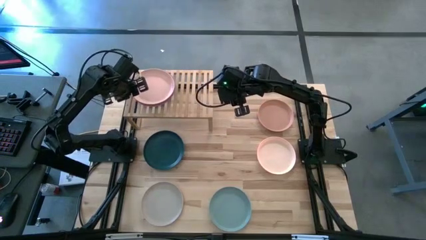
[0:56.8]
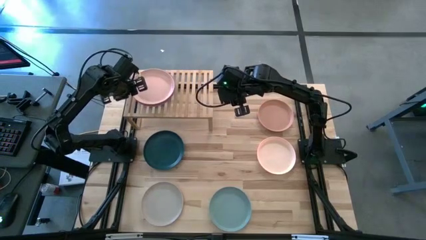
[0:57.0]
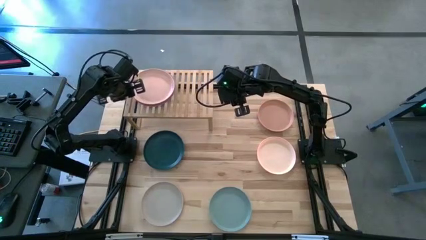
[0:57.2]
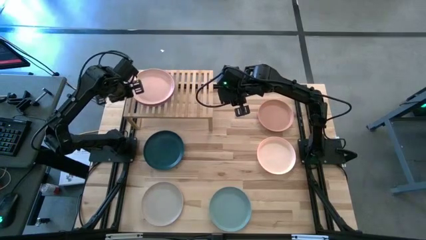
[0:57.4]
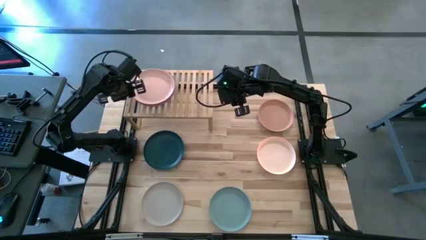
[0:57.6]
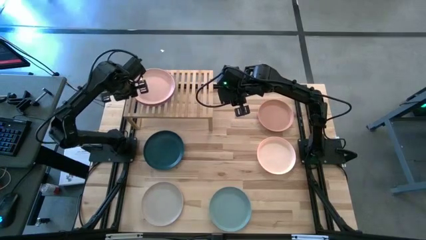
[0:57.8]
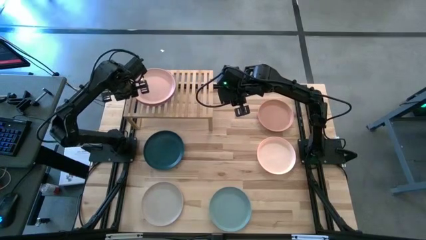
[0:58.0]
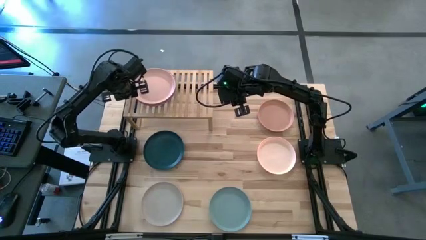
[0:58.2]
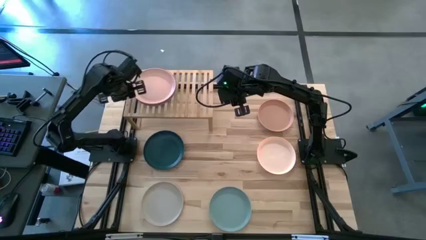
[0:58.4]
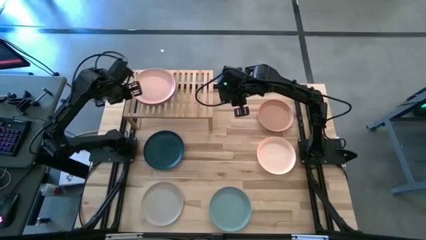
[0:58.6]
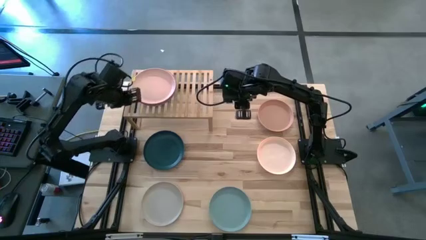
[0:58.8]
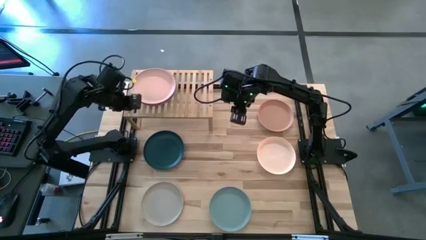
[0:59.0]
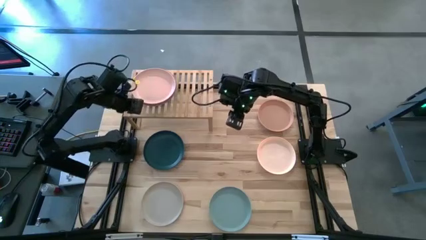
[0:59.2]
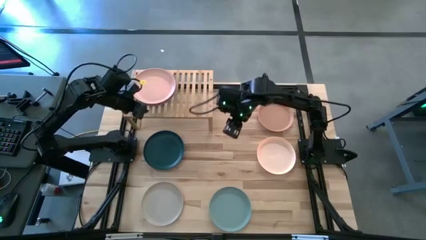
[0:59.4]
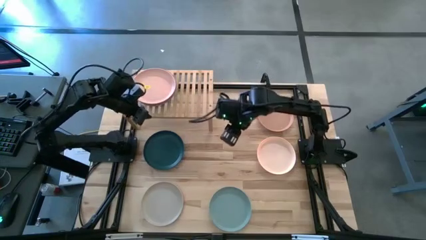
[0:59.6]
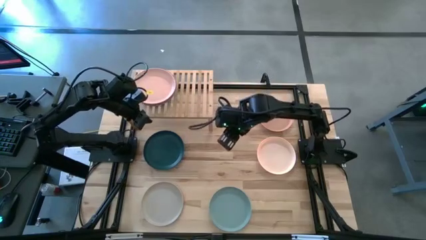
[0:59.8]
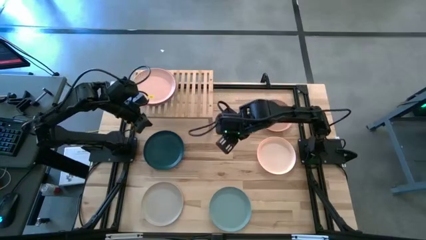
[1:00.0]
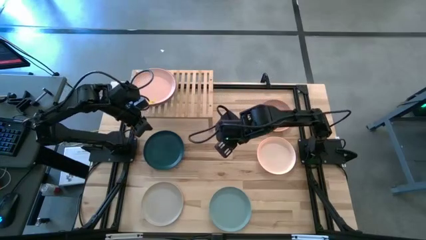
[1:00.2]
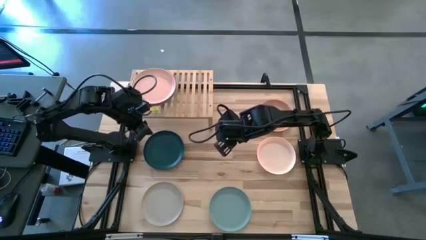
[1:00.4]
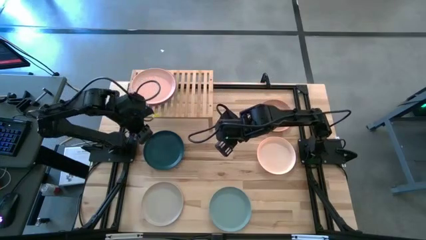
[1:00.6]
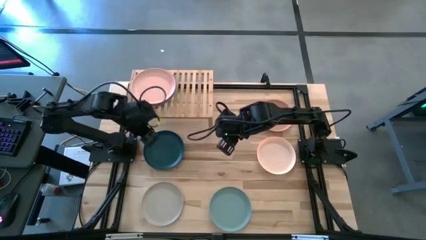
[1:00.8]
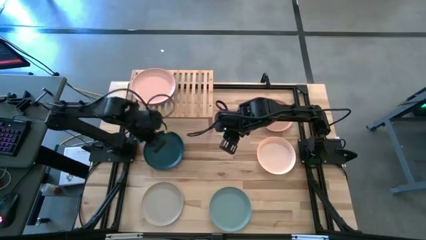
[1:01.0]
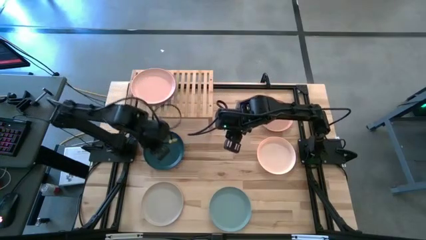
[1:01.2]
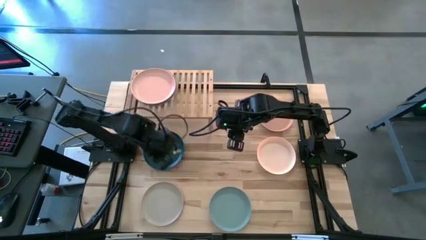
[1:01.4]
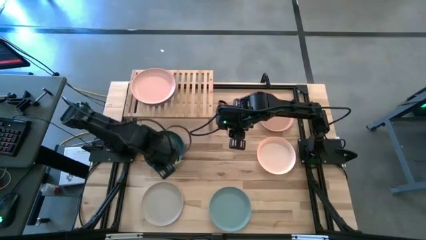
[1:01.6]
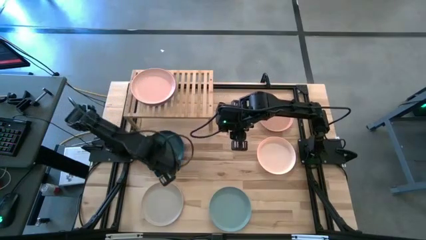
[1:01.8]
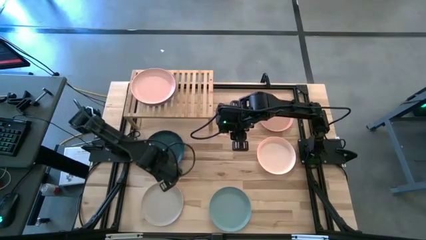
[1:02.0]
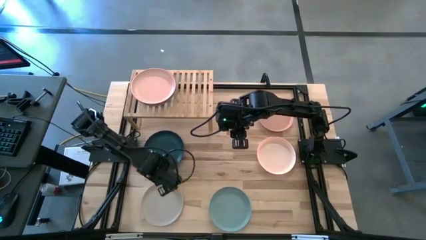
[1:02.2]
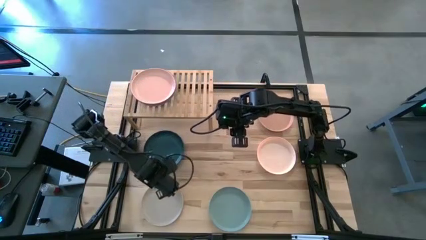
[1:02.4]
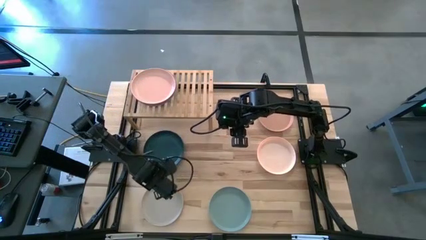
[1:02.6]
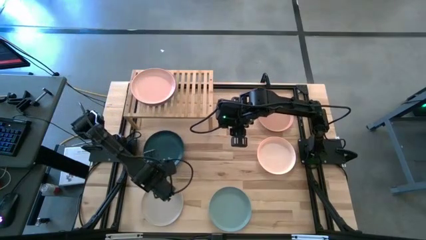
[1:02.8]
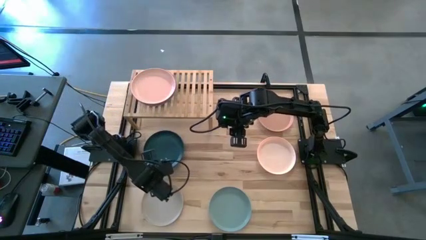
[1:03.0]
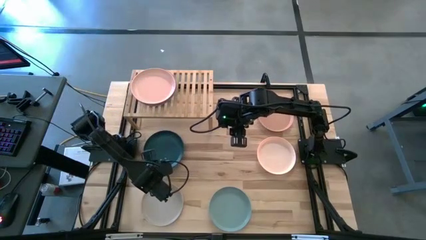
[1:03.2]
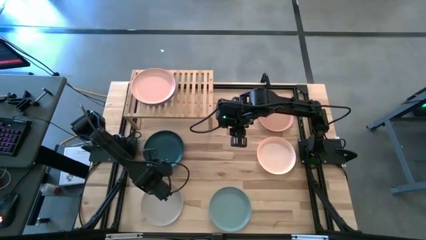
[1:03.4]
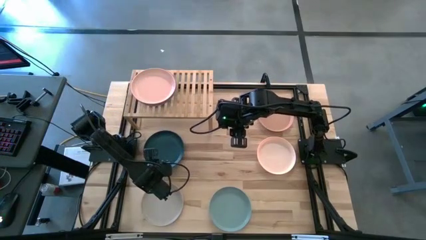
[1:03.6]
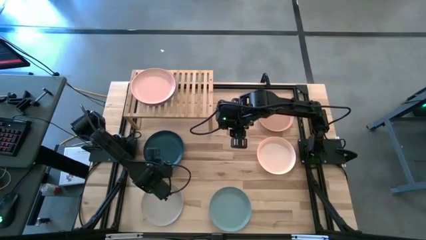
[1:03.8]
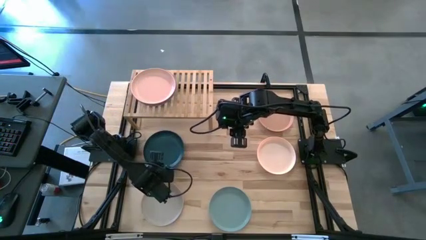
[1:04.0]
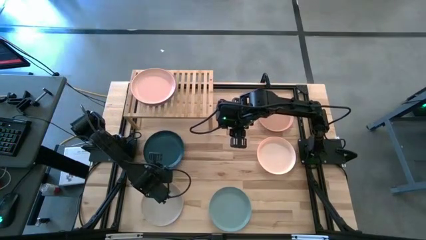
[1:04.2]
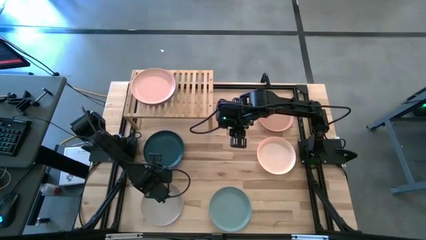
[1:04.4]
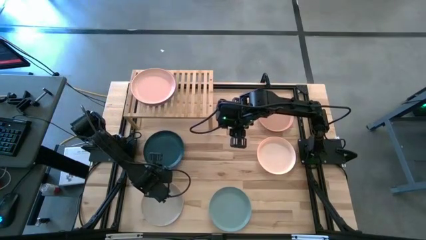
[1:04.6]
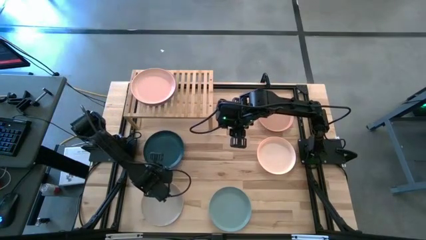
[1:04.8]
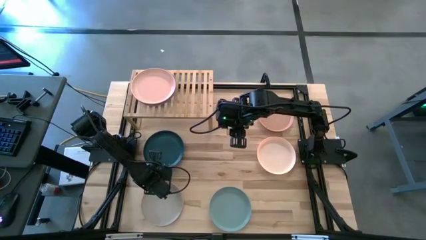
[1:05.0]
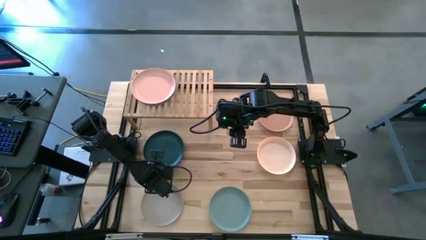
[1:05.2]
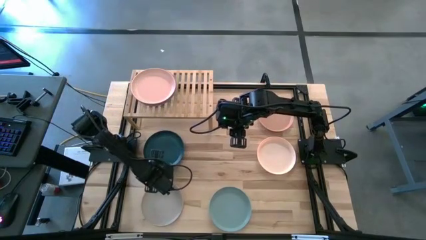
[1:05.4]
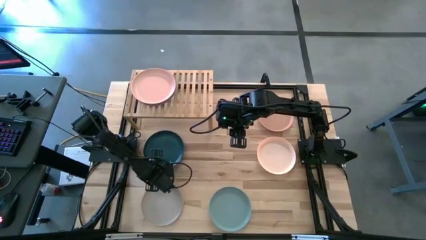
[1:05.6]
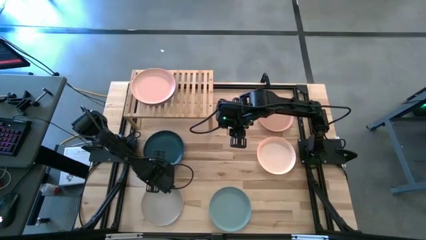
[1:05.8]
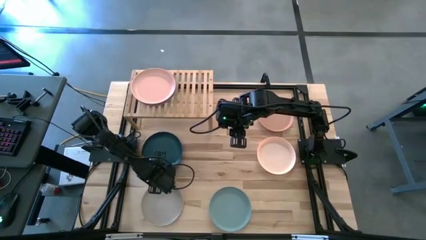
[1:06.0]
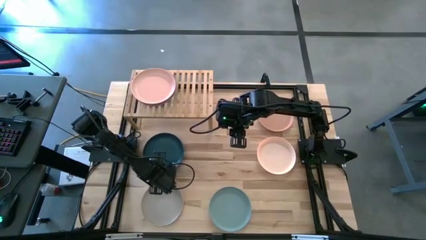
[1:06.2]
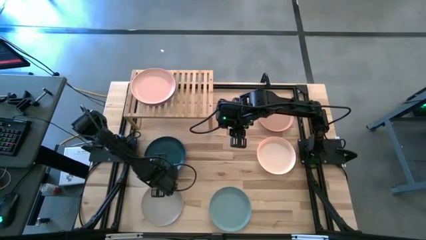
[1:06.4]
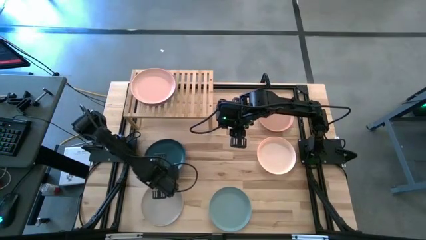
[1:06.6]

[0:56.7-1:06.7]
Task: Place and stack plates onto a shelf
Stack the green plate on the top of the light pink plate
